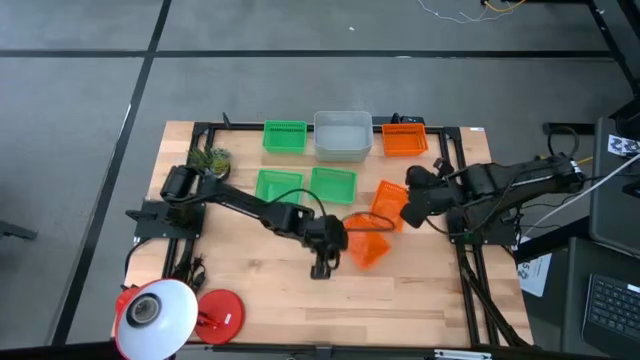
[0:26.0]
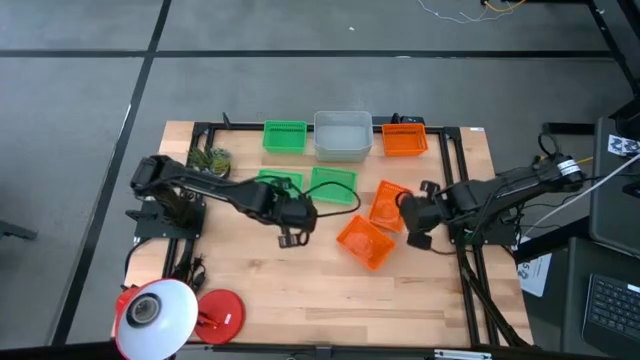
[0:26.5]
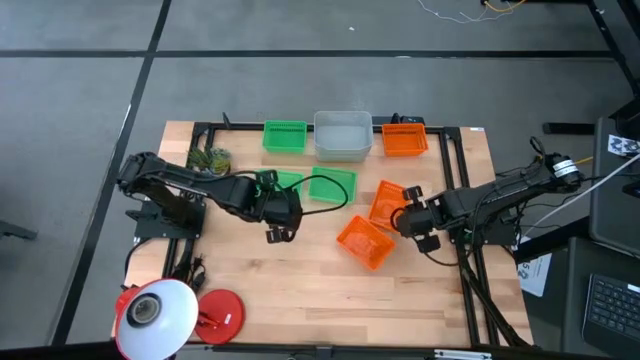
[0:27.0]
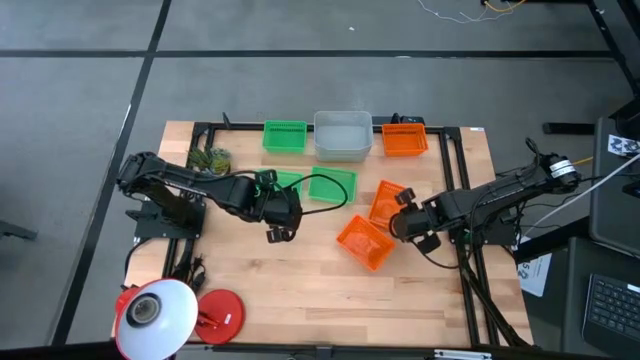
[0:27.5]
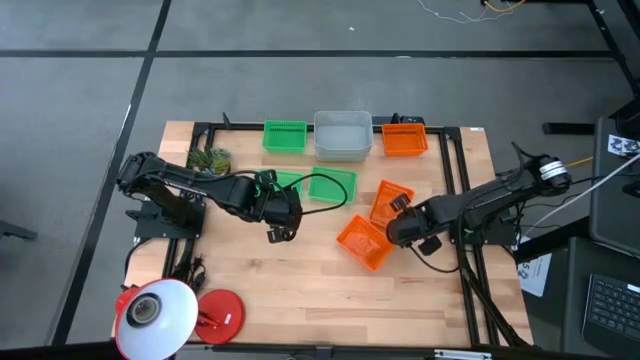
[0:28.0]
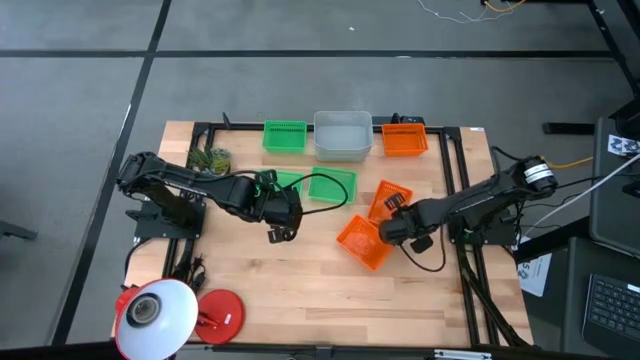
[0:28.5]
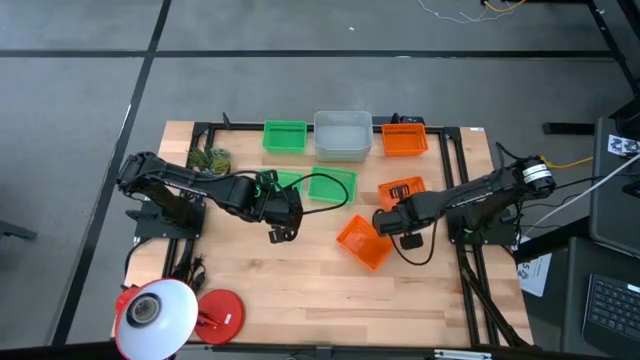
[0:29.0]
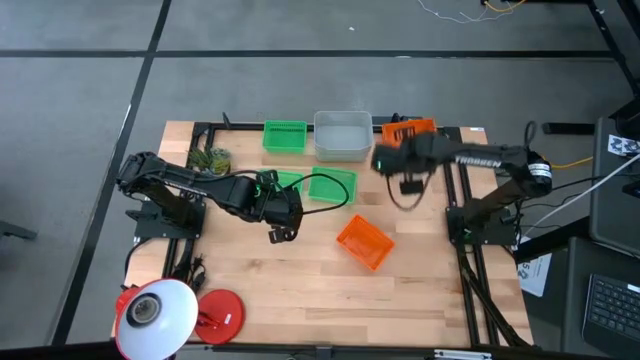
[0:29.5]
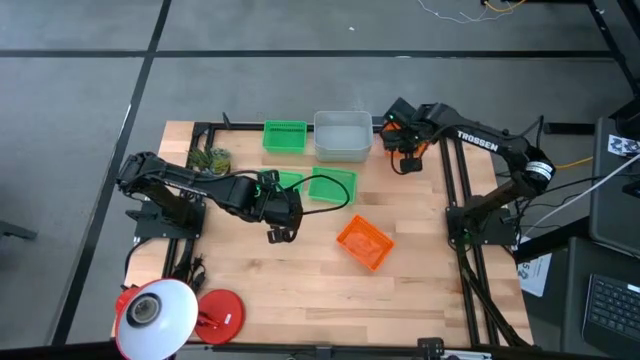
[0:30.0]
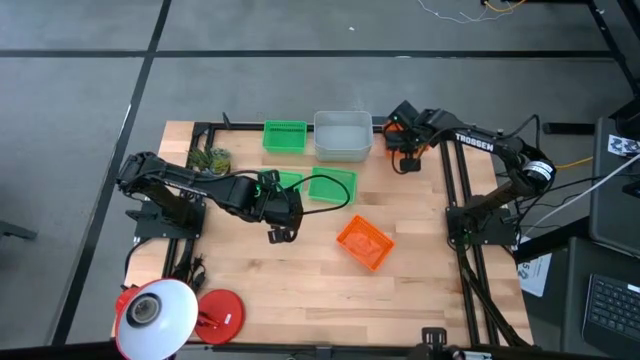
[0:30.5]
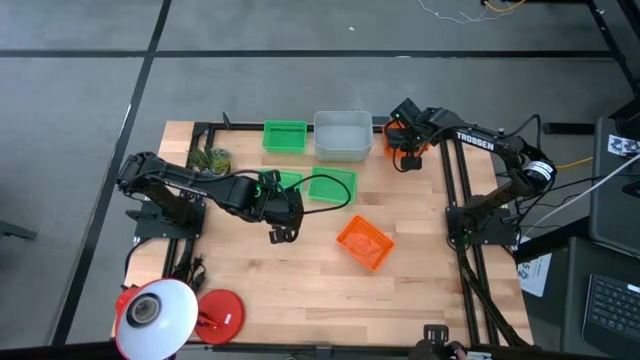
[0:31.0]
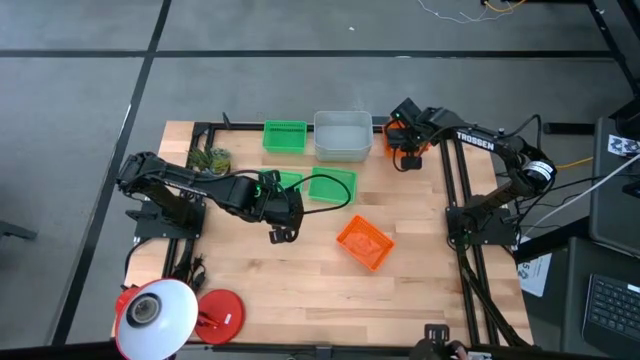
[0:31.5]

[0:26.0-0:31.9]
Stack the middle orange bin on top of the top orange bin

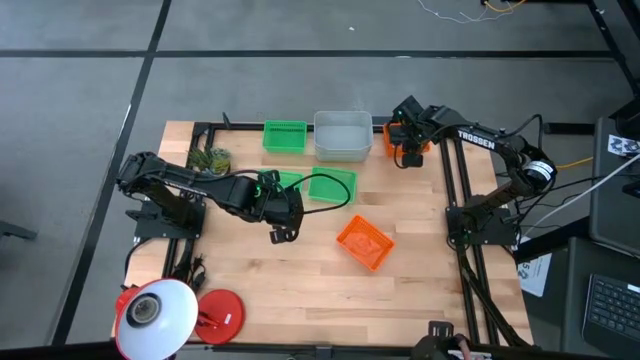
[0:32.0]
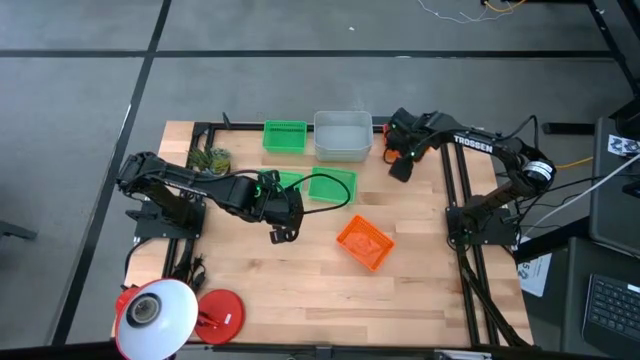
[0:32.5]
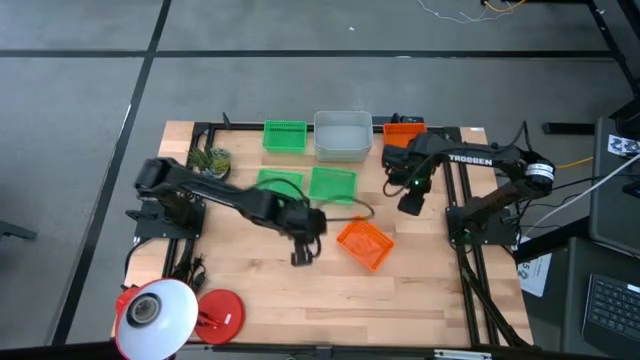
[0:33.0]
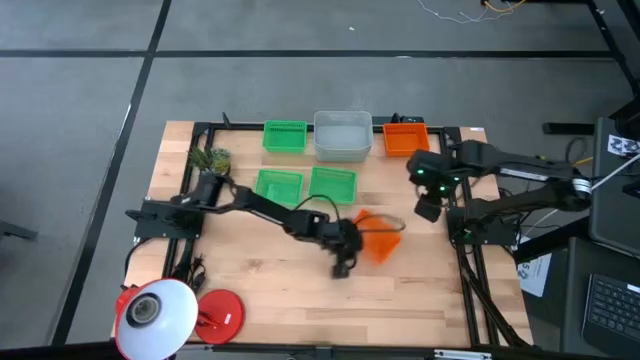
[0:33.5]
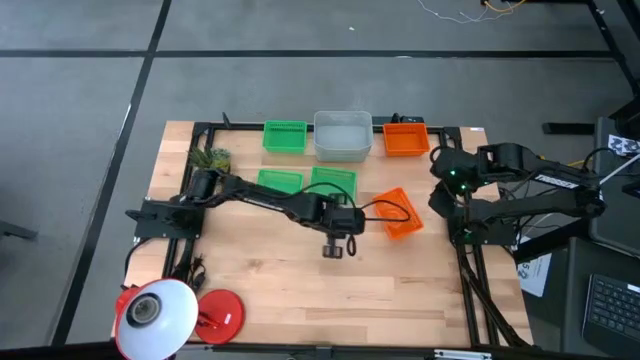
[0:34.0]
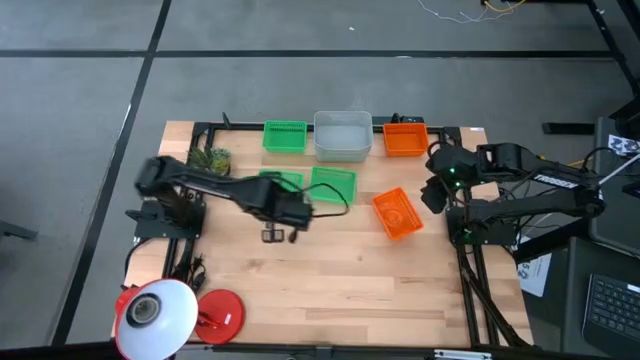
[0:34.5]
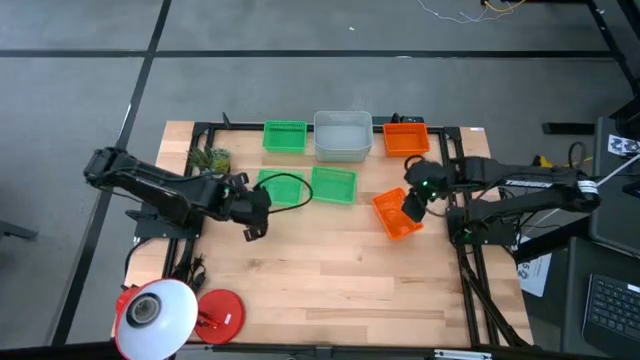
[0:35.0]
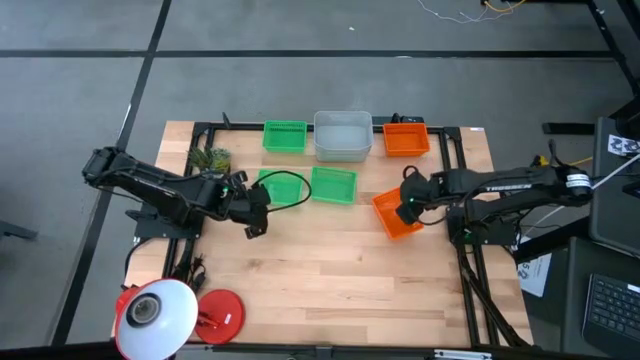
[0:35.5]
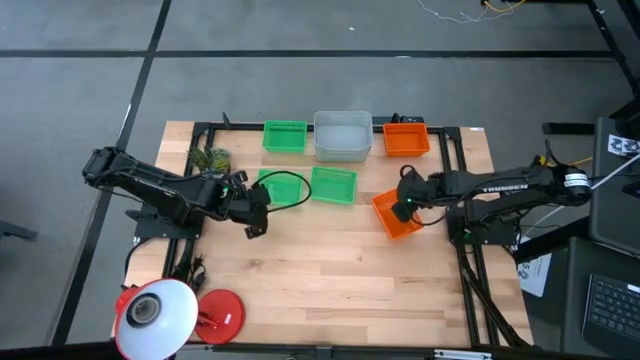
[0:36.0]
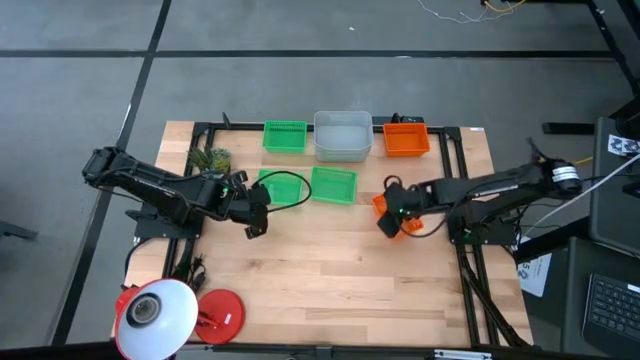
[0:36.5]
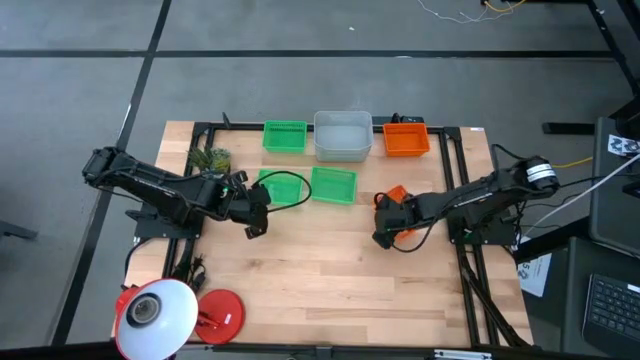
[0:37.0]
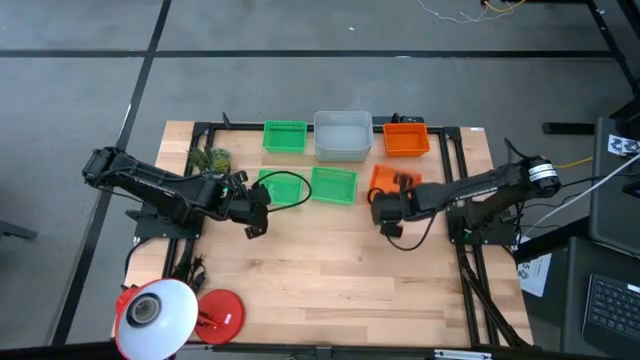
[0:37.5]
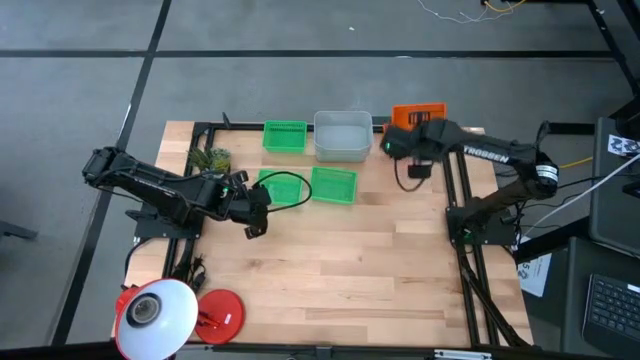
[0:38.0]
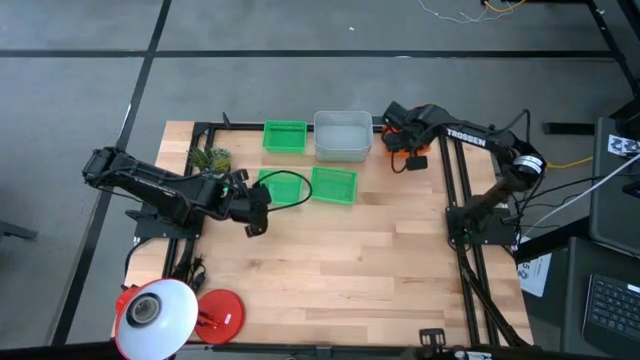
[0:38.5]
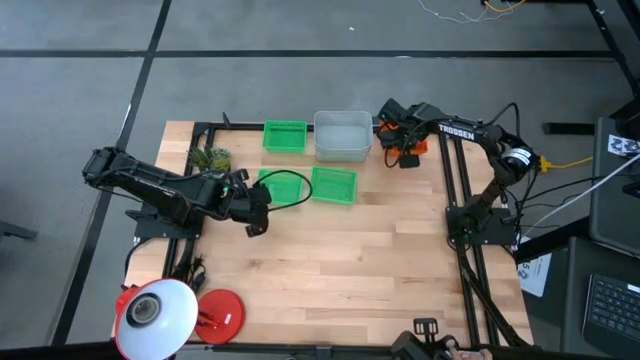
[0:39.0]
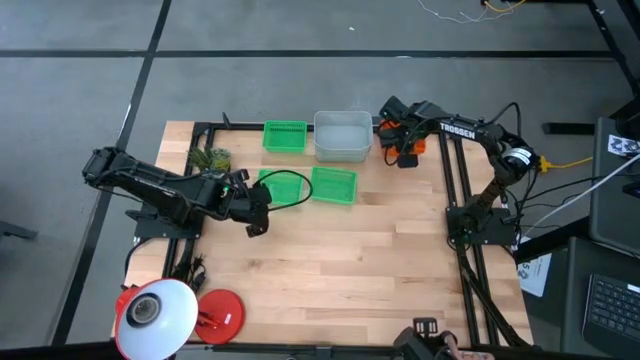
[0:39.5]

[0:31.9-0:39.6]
Stack the bottom orange bin on top of the top orange bin

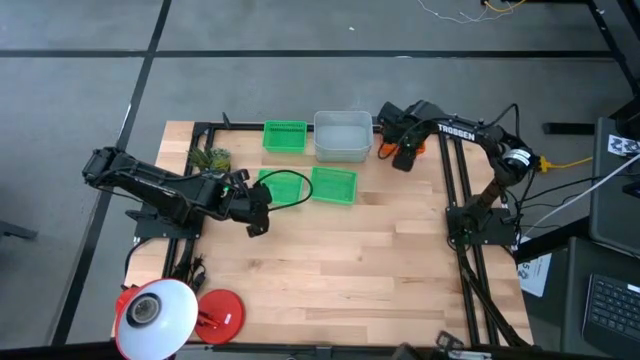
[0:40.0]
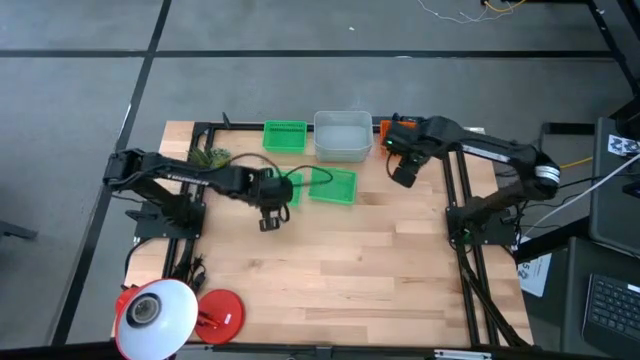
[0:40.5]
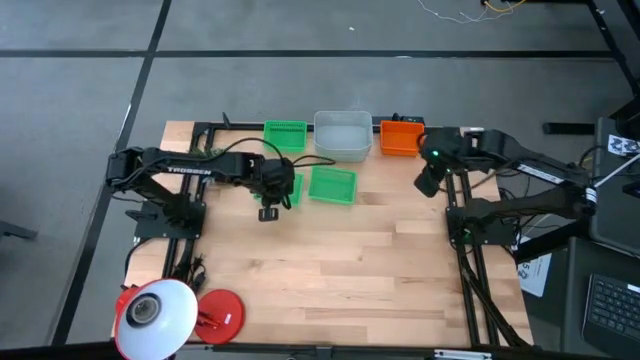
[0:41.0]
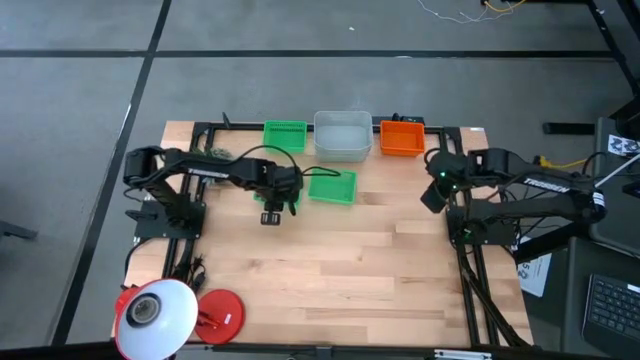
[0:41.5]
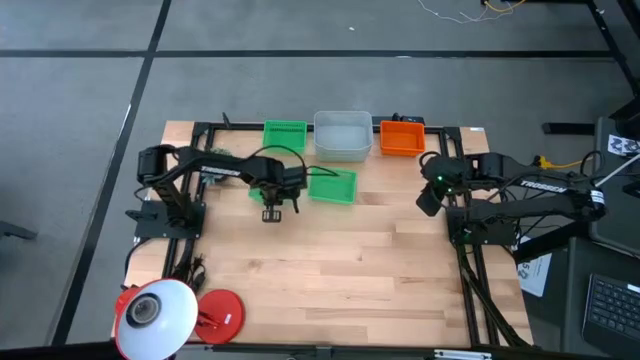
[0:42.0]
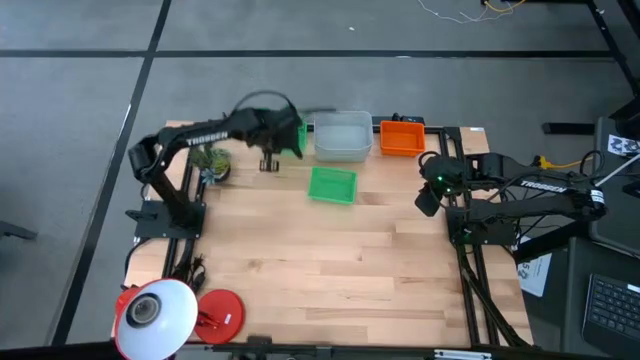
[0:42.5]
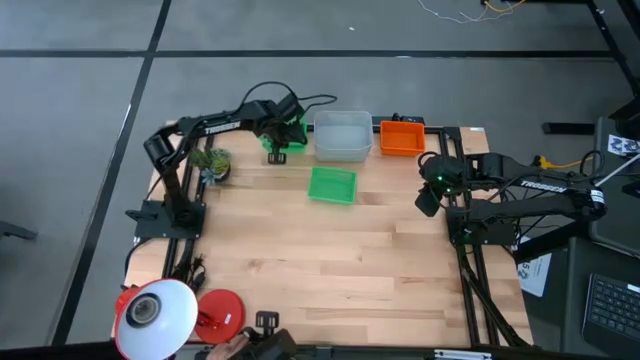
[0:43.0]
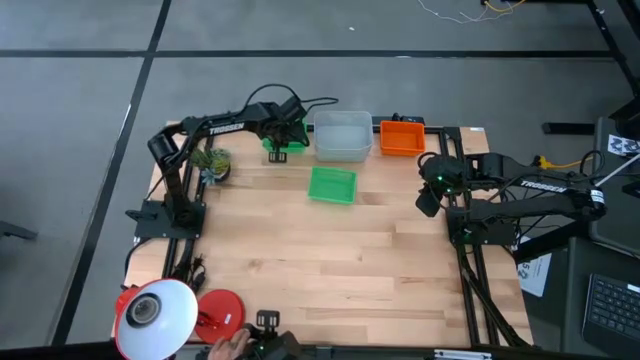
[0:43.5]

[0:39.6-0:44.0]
Stack the bottom left green bin on top of the top green bin

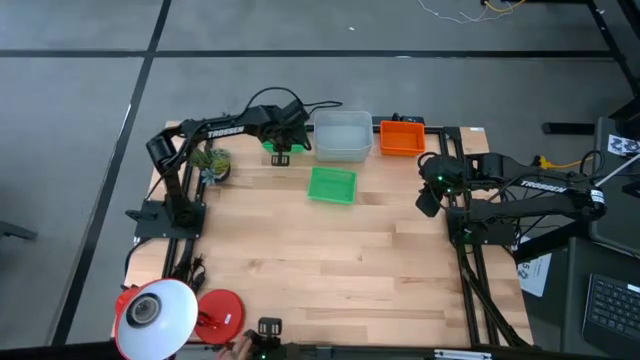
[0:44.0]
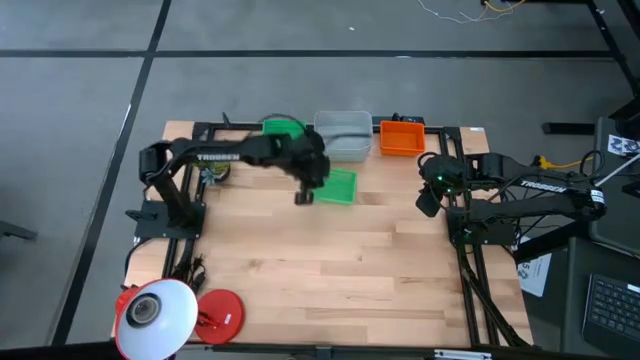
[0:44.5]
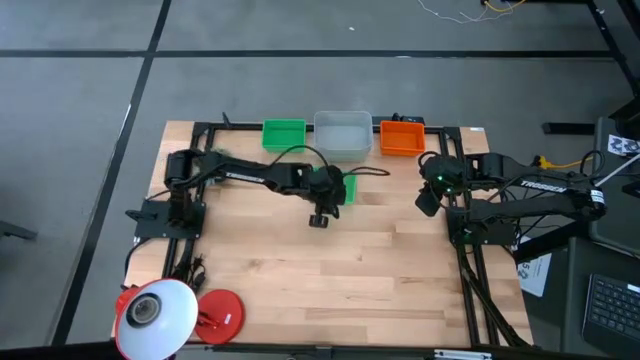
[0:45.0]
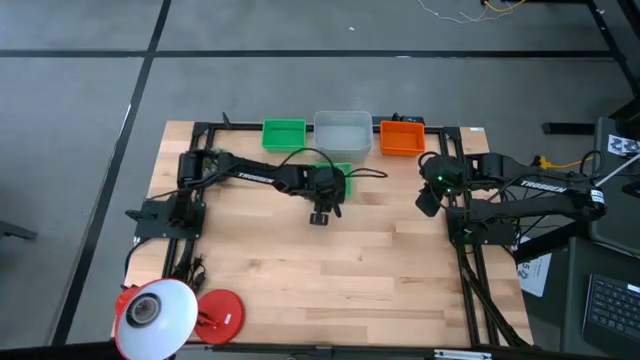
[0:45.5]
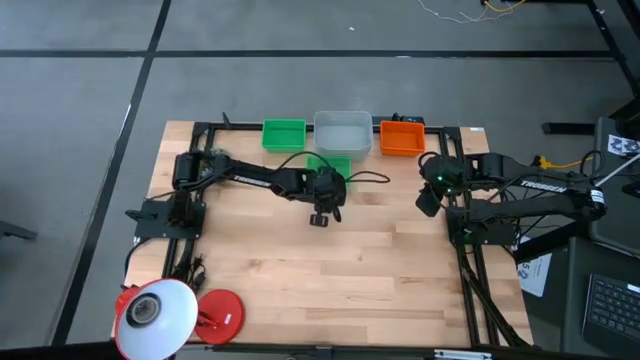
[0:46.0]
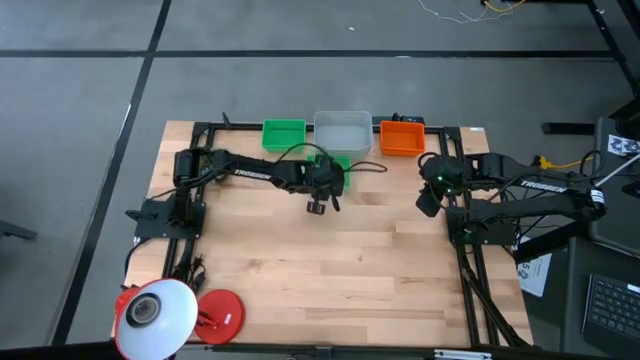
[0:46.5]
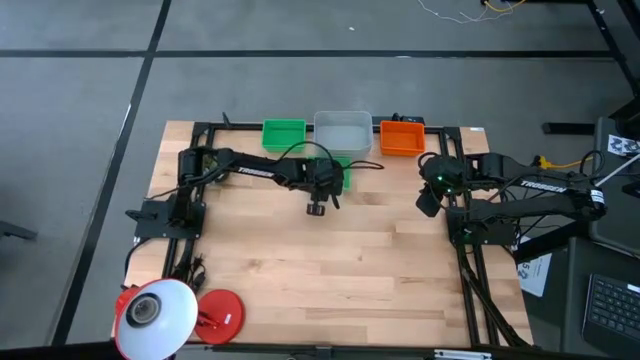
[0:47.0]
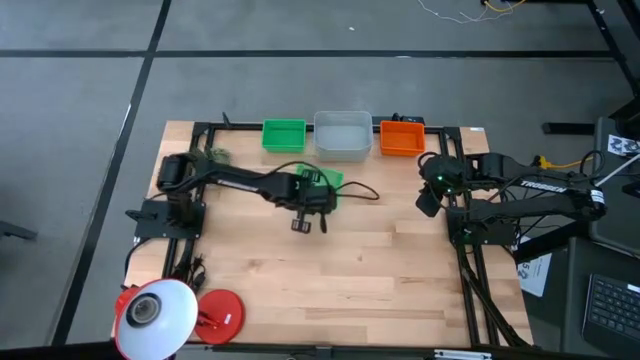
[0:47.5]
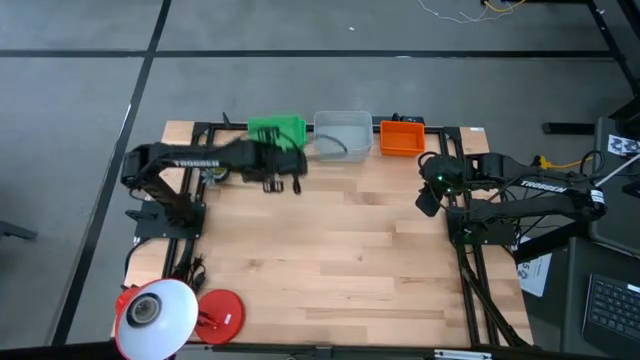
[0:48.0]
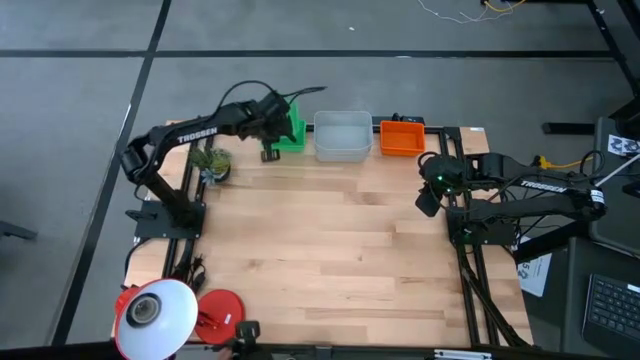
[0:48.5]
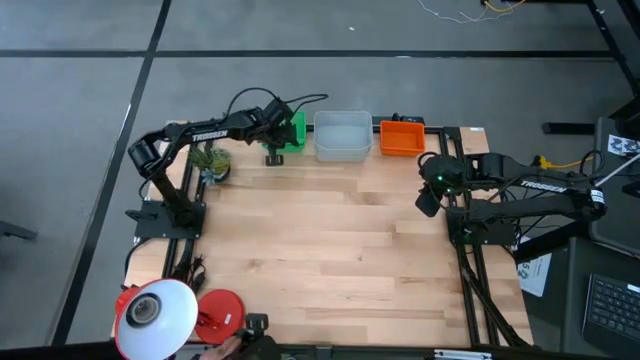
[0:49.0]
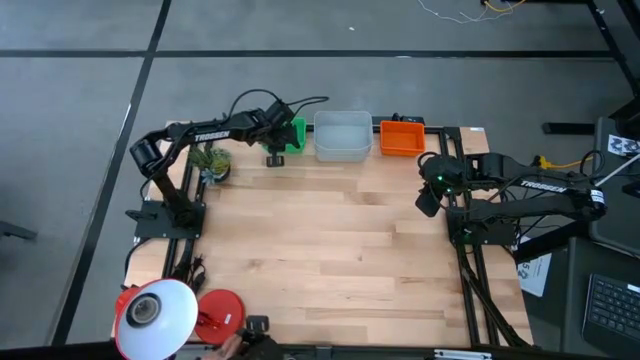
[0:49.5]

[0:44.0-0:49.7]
Stack the bottom green bin on top of the top green bin
